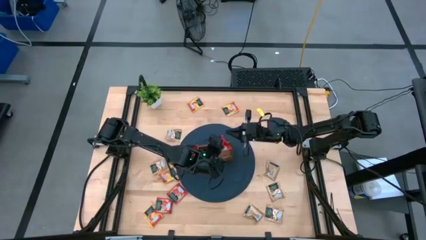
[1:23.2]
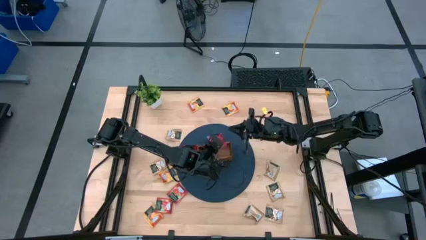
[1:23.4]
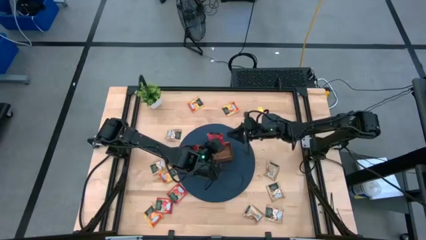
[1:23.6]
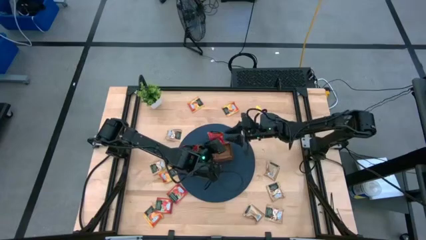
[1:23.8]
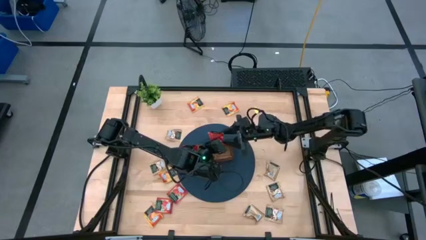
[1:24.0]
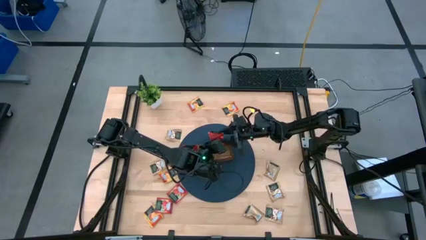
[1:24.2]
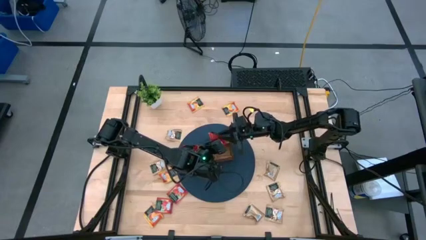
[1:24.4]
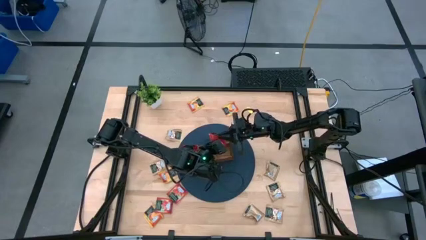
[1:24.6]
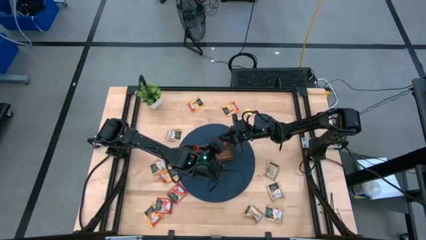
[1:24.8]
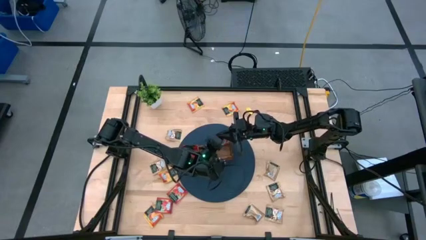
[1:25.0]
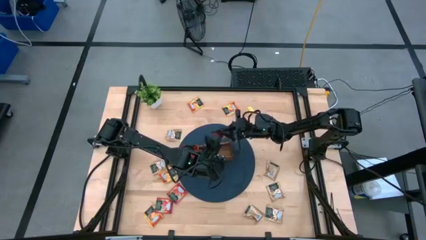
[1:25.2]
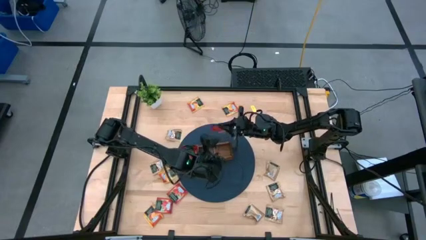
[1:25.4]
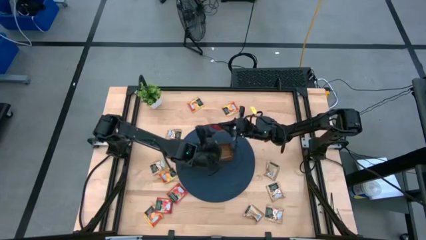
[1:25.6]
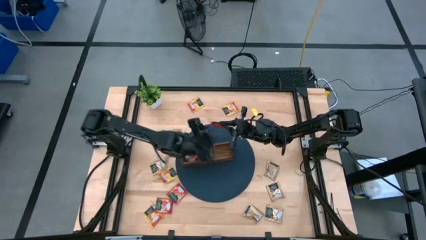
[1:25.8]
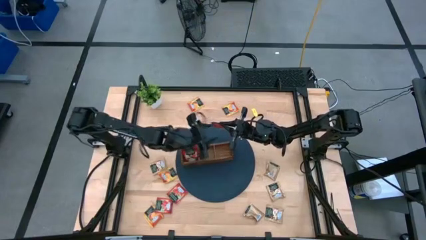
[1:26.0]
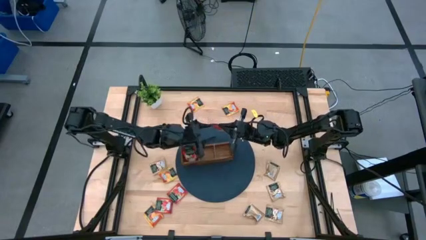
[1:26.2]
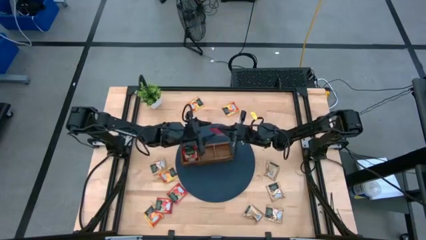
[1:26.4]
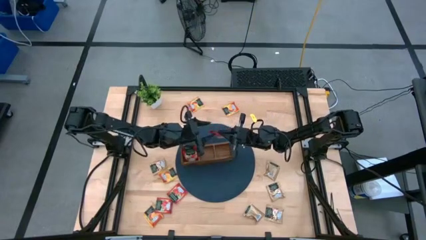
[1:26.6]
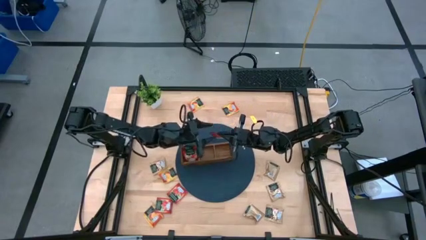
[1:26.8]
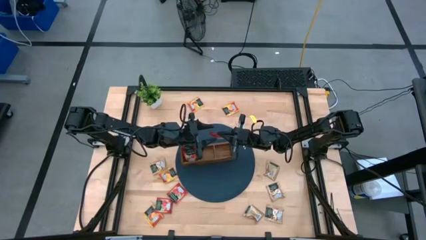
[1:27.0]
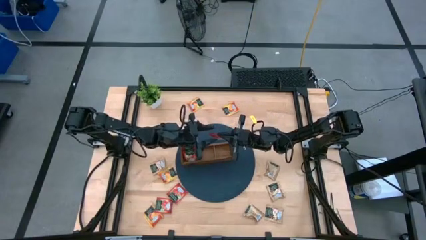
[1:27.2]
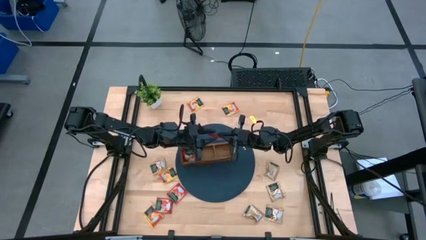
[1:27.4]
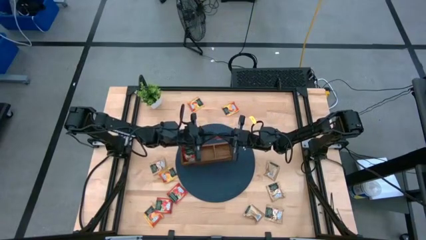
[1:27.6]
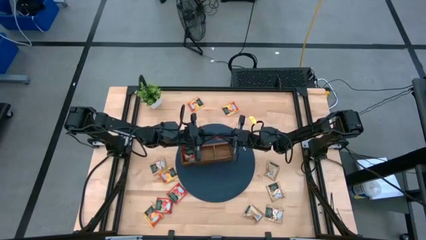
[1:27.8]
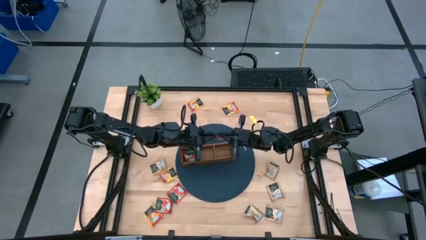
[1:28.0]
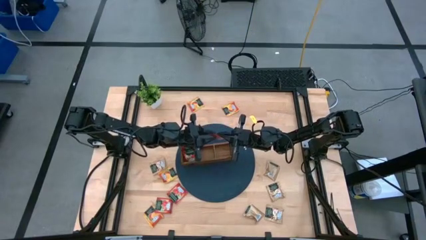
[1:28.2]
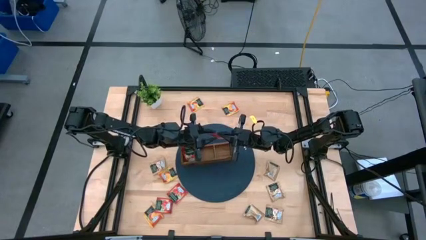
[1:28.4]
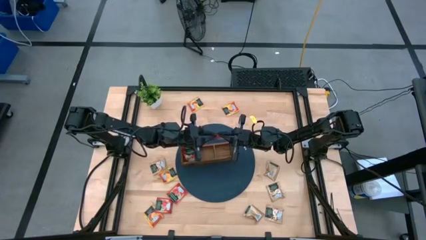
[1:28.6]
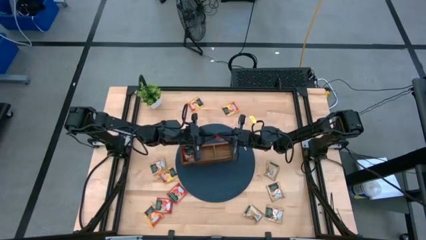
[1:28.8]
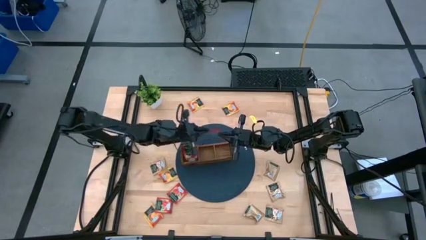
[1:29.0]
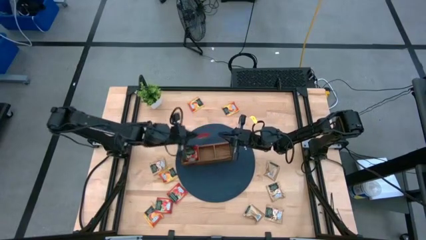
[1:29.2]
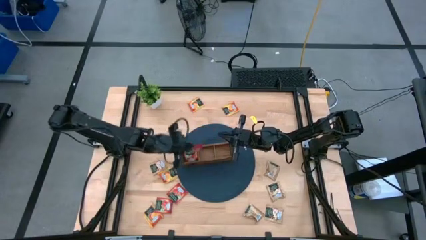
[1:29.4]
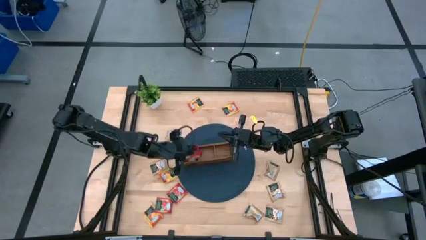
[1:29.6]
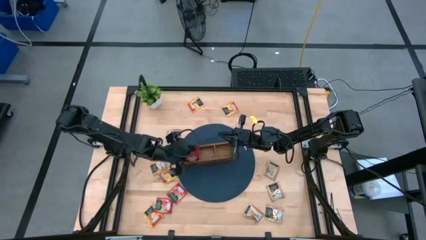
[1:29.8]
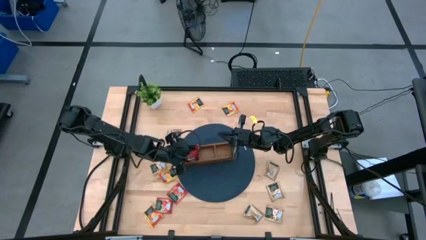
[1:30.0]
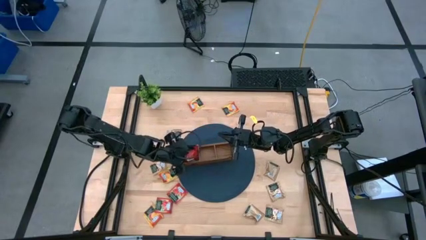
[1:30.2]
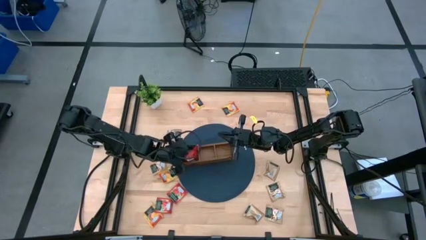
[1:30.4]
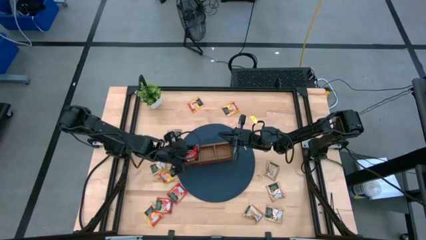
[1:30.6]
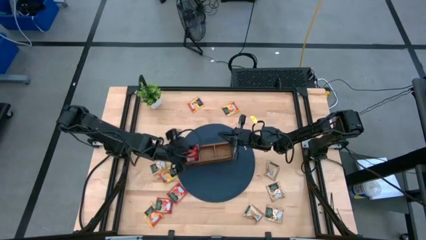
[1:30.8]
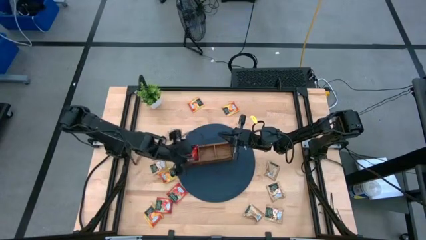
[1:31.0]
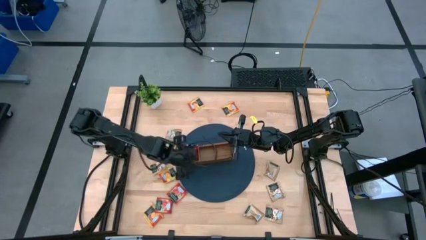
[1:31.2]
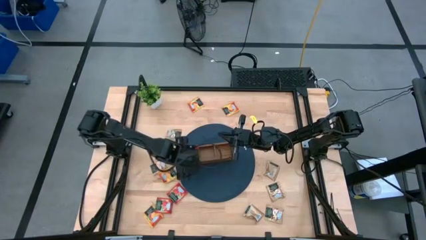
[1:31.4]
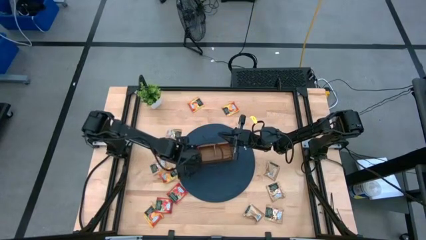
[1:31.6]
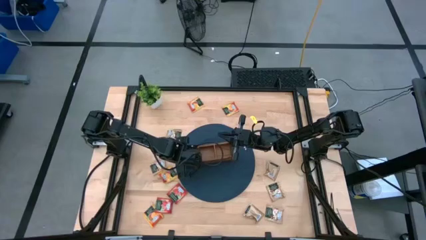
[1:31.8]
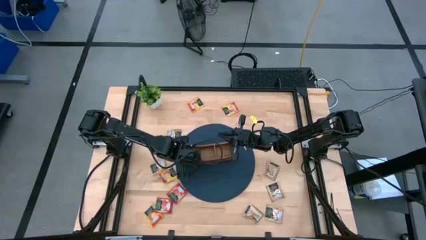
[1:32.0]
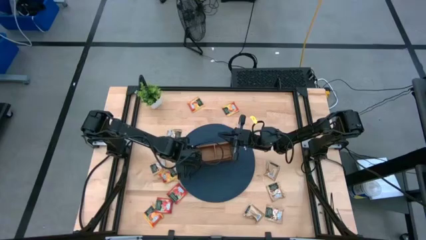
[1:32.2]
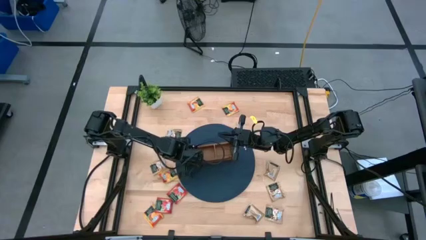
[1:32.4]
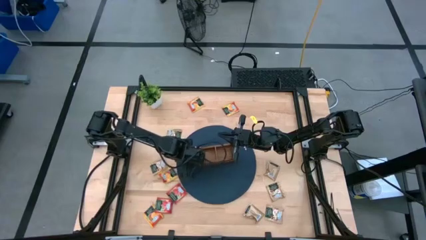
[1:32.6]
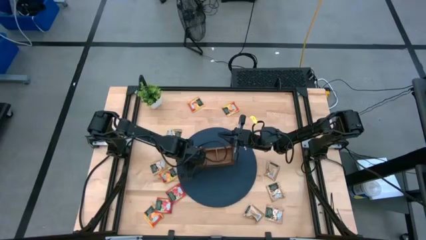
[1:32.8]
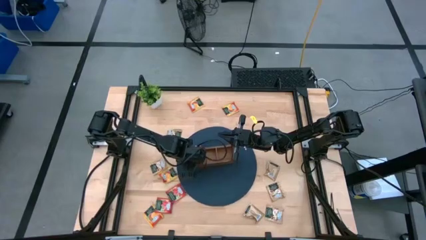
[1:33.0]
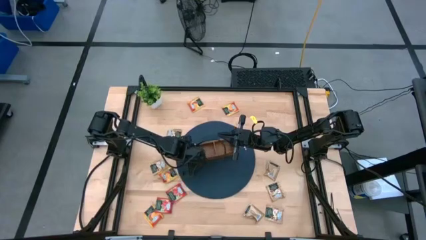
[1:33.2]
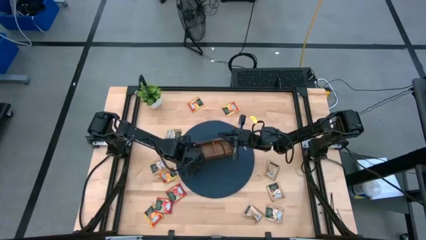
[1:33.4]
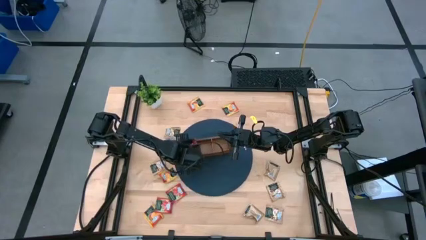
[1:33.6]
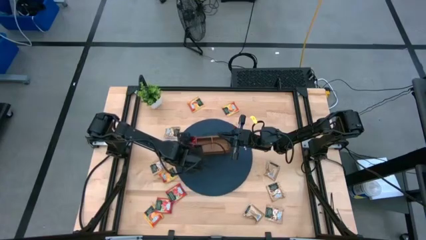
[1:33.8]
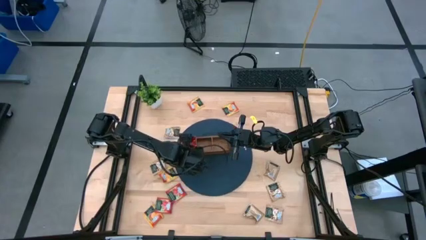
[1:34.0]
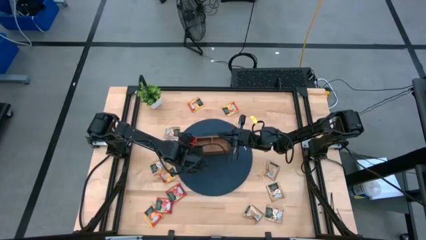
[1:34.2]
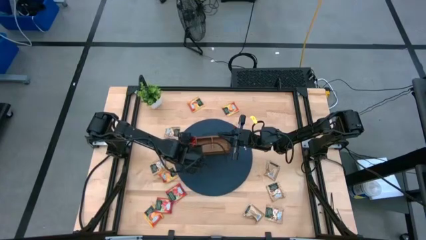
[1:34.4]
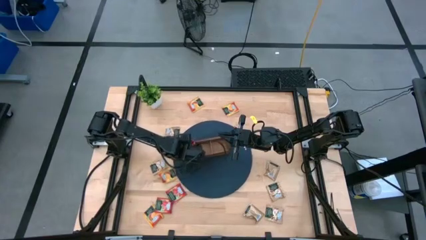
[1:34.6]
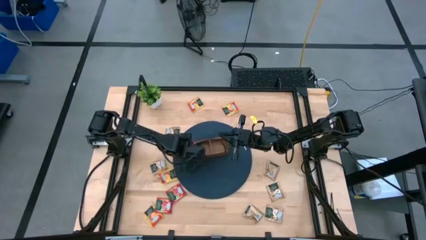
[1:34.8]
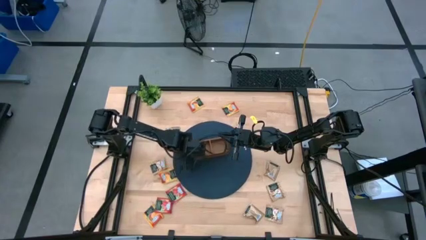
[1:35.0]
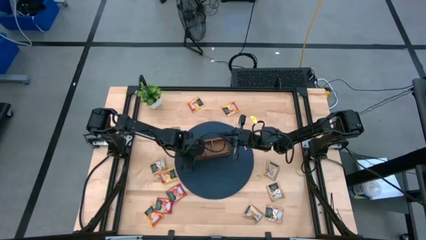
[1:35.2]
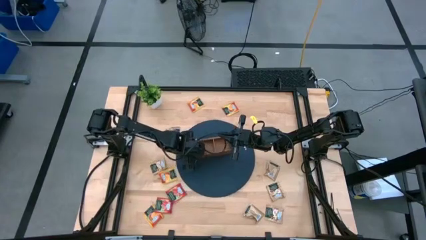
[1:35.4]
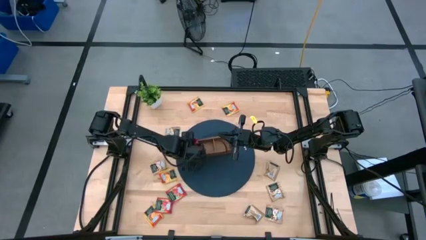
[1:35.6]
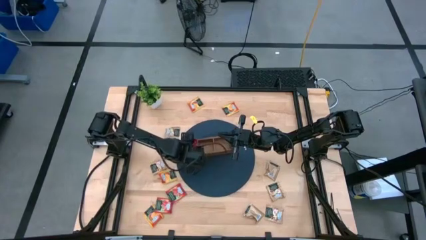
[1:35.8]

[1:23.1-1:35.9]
Task: Pick & Place Tea
Put the top red tea bag into the left section of the wooden organizer

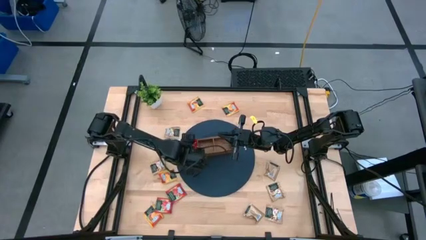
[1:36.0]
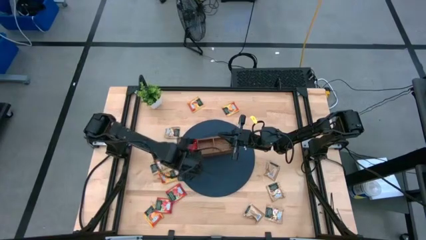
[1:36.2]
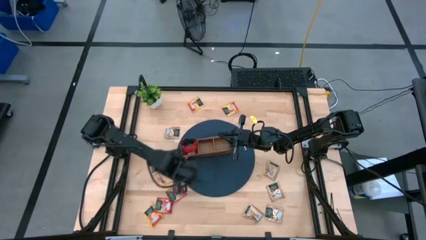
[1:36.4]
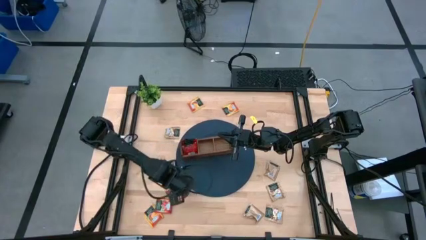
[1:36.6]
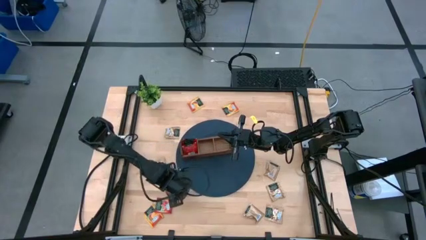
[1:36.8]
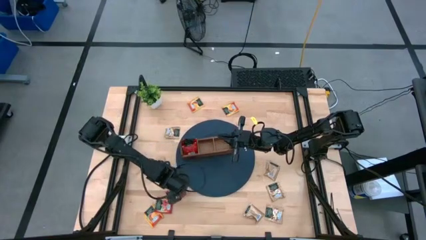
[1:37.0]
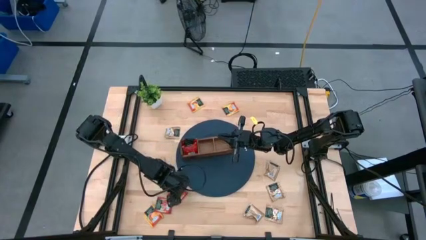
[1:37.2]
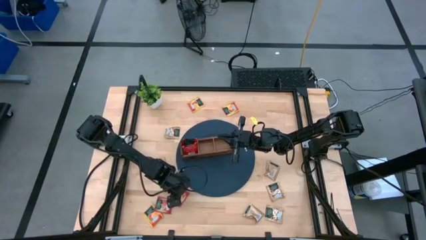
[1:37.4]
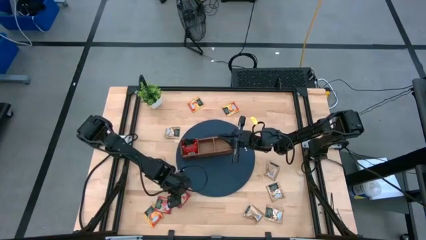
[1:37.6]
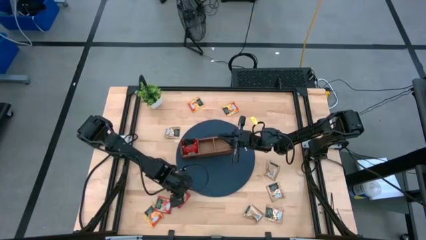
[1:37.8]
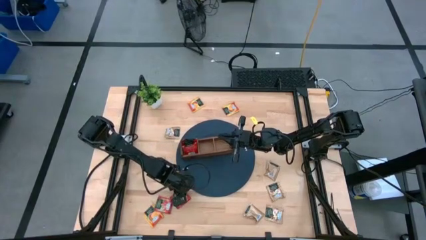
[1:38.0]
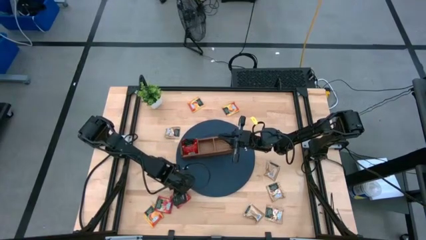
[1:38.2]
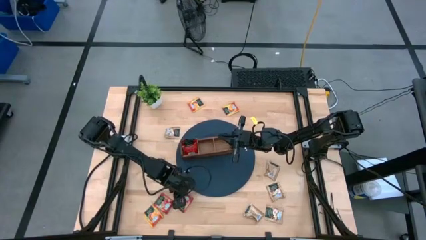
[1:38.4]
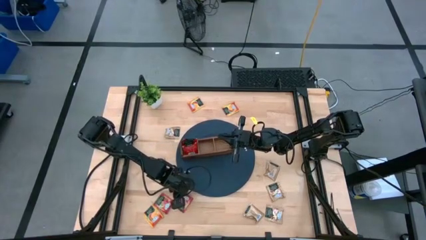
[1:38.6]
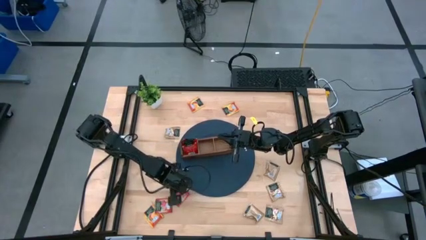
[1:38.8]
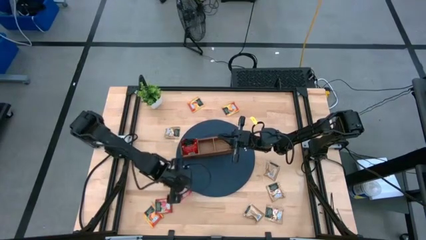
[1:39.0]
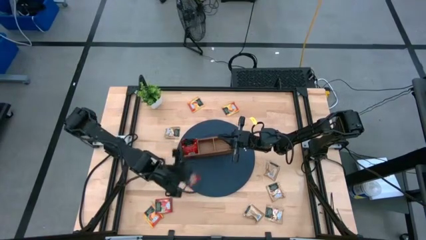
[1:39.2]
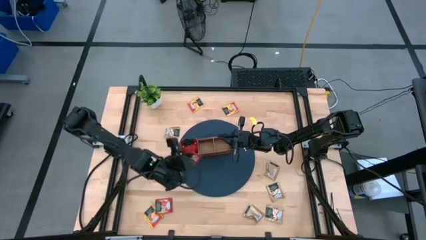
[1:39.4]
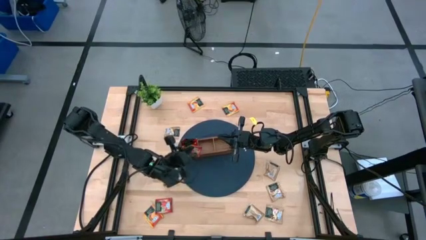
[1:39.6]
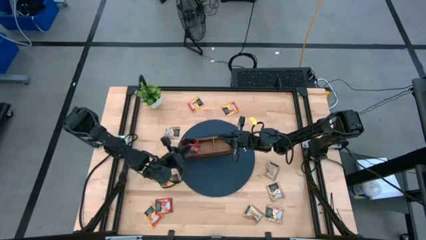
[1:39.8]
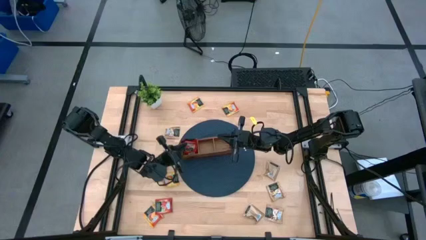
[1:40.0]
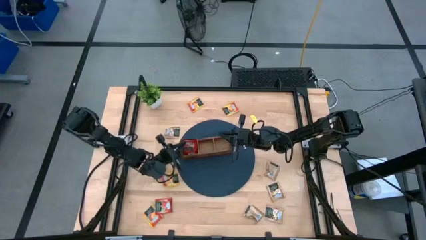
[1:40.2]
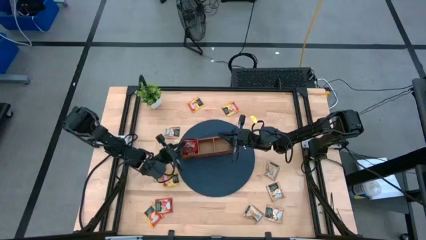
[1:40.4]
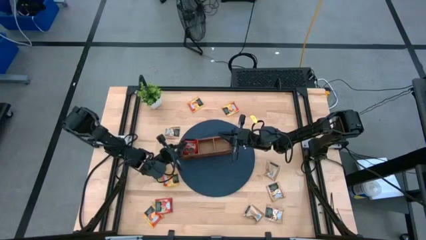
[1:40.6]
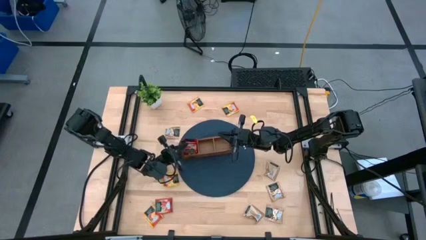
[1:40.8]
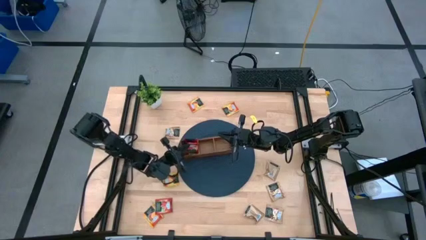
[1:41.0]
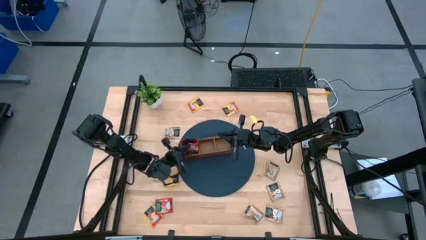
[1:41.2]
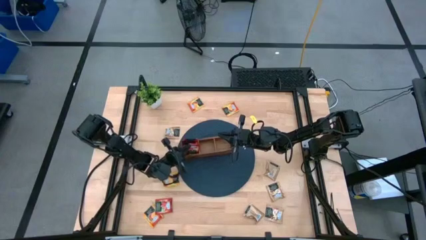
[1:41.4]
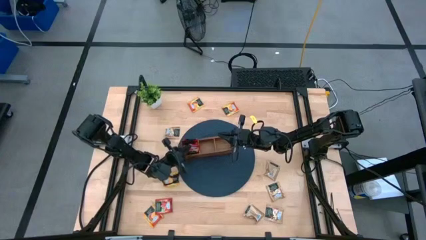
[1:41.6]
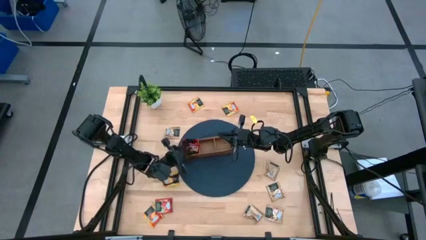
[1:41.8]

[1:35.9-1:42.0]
Put the top red tea bag into the left section of the wooden organizer
